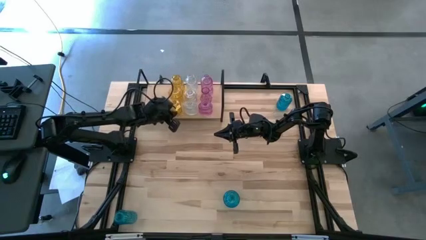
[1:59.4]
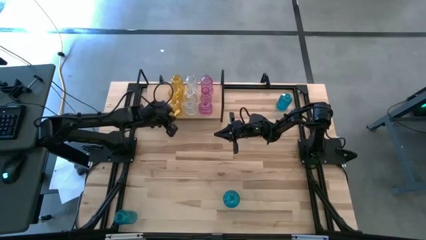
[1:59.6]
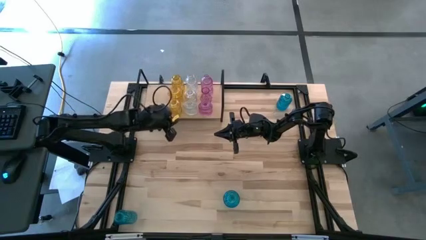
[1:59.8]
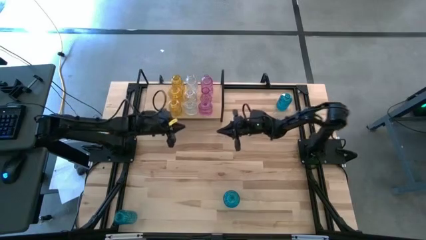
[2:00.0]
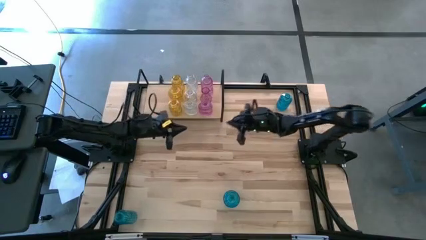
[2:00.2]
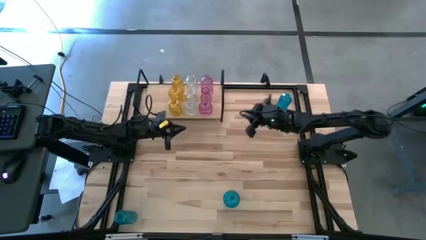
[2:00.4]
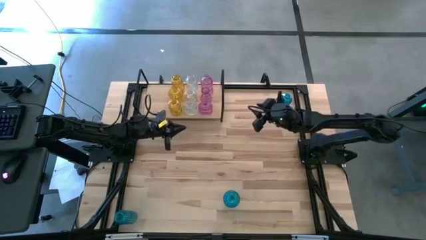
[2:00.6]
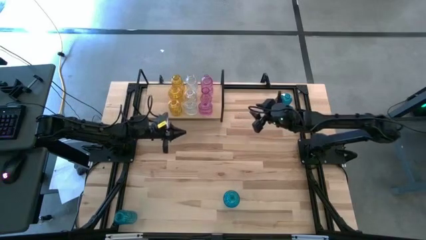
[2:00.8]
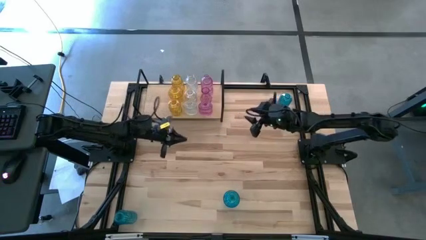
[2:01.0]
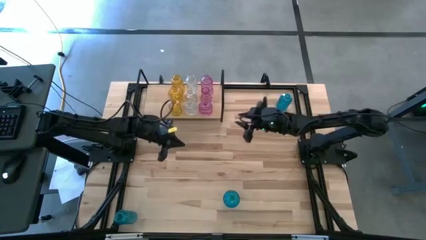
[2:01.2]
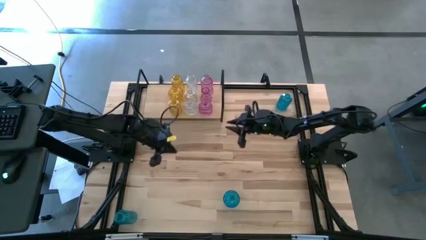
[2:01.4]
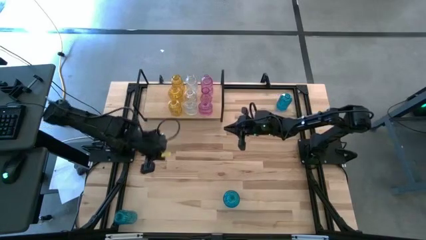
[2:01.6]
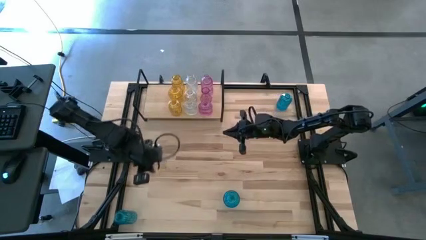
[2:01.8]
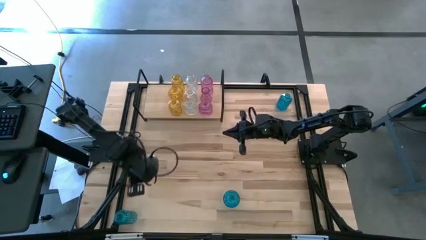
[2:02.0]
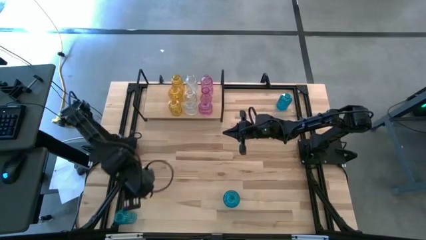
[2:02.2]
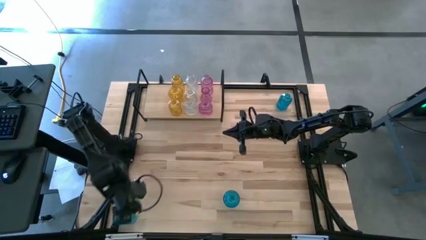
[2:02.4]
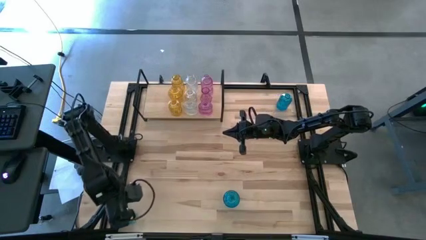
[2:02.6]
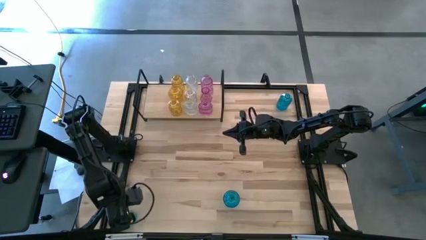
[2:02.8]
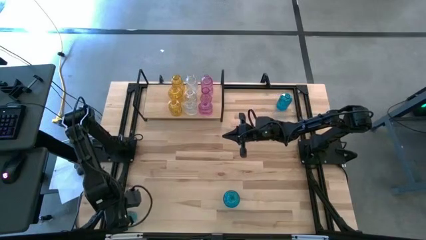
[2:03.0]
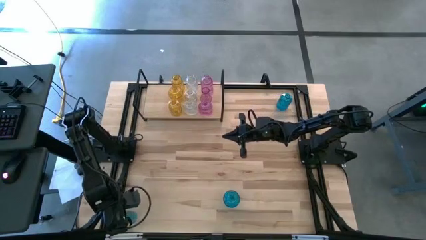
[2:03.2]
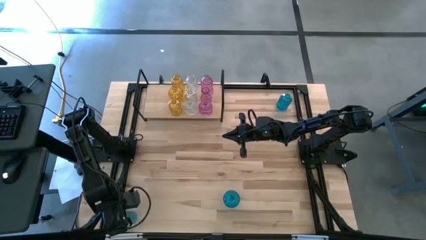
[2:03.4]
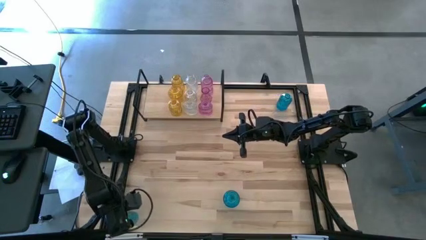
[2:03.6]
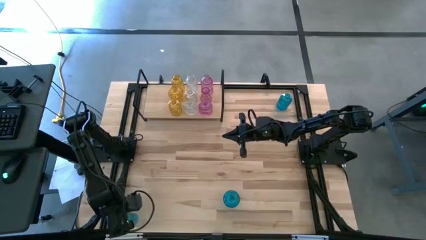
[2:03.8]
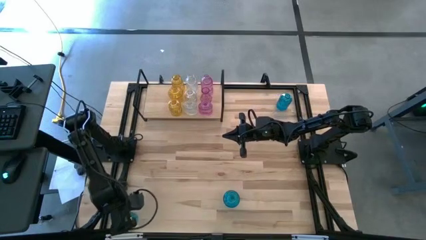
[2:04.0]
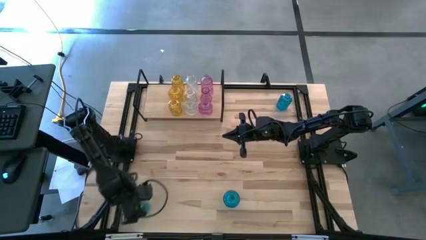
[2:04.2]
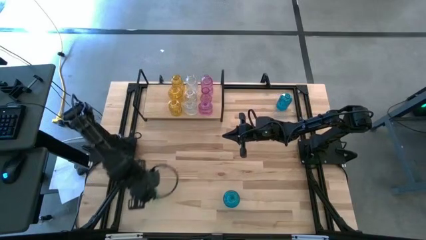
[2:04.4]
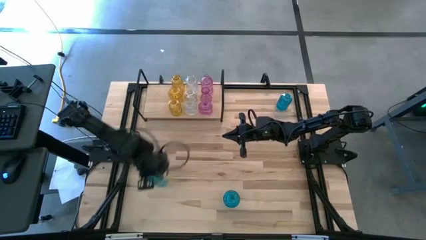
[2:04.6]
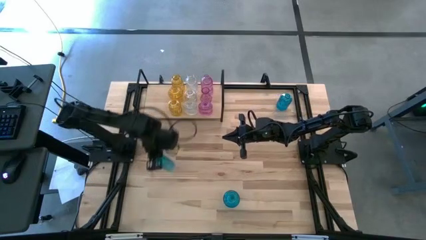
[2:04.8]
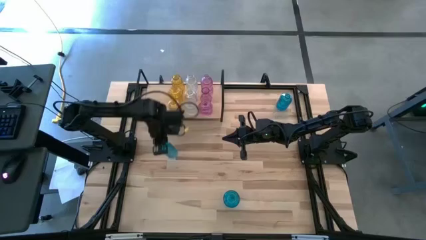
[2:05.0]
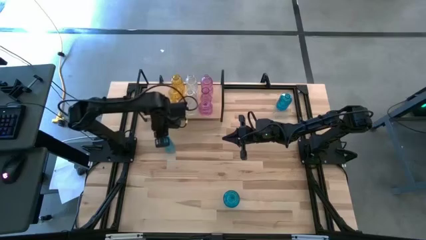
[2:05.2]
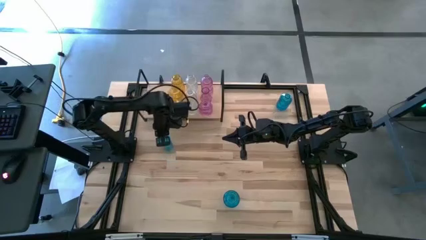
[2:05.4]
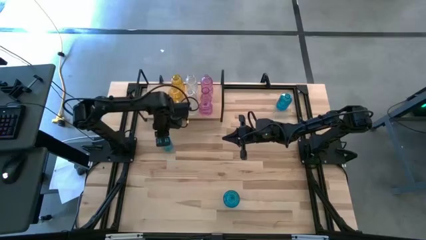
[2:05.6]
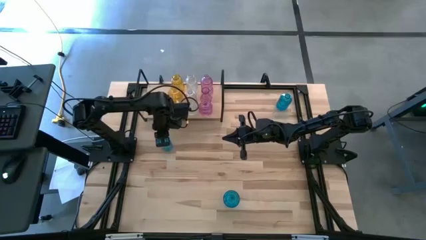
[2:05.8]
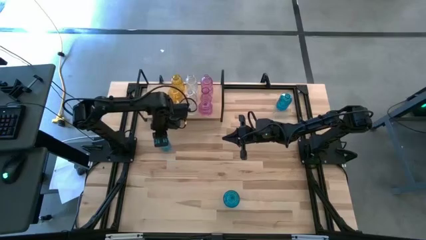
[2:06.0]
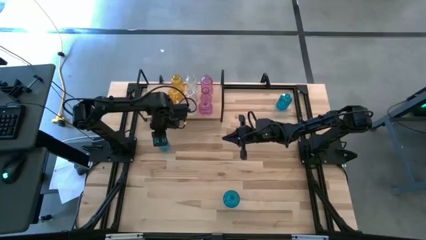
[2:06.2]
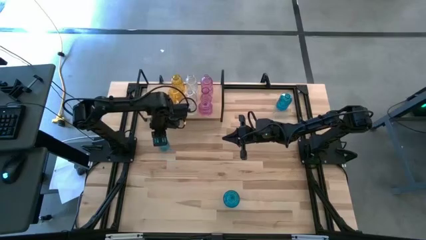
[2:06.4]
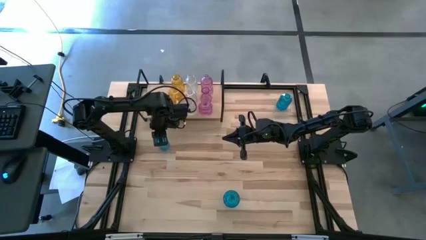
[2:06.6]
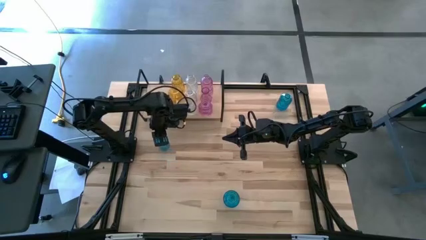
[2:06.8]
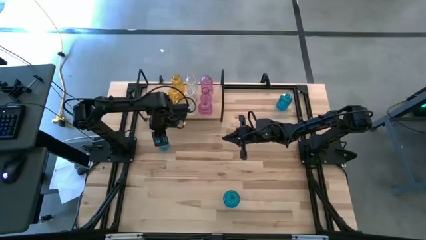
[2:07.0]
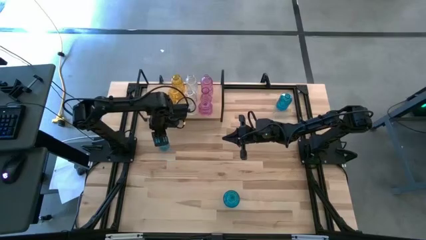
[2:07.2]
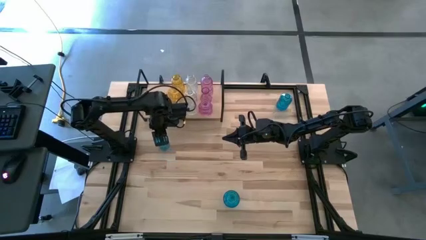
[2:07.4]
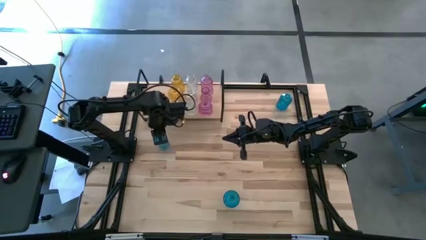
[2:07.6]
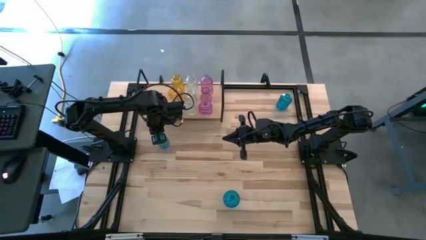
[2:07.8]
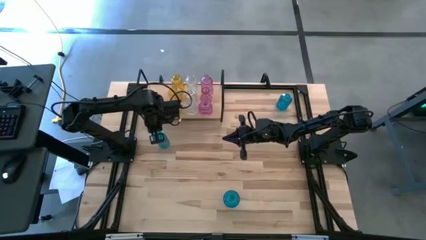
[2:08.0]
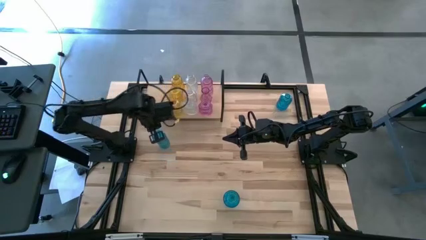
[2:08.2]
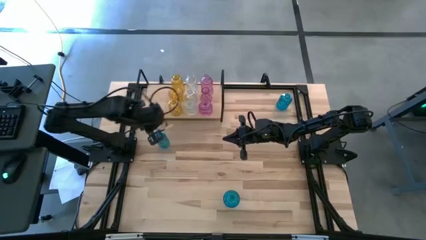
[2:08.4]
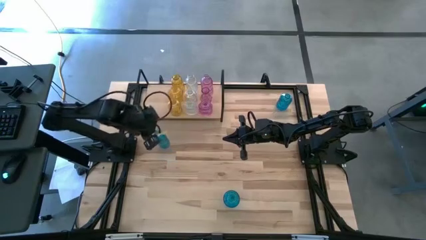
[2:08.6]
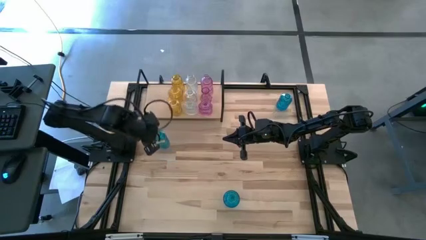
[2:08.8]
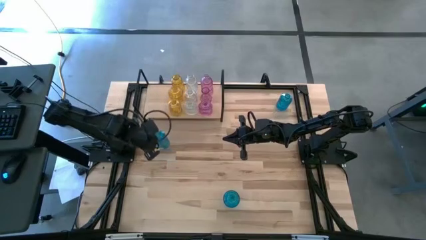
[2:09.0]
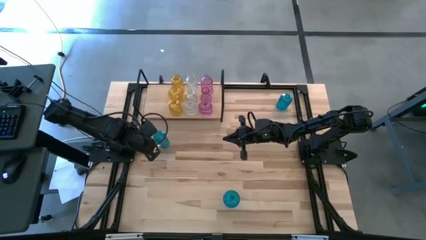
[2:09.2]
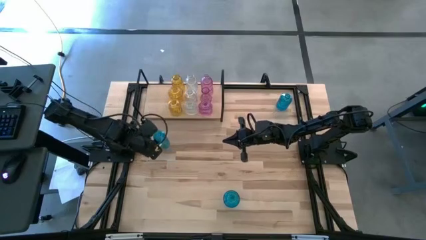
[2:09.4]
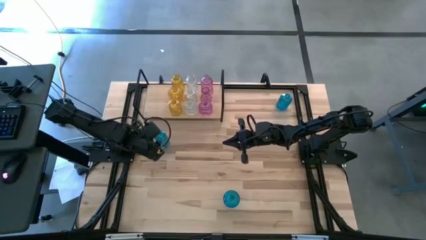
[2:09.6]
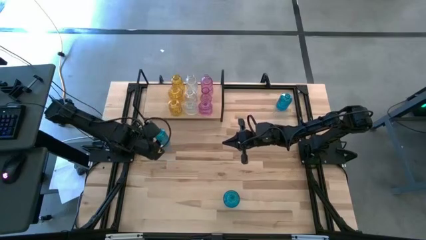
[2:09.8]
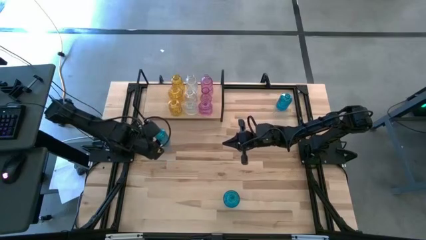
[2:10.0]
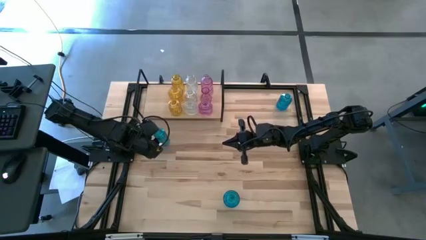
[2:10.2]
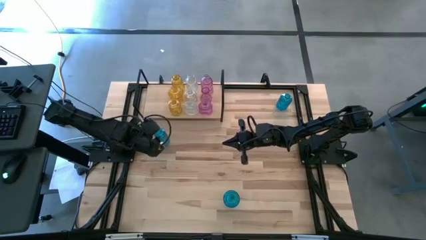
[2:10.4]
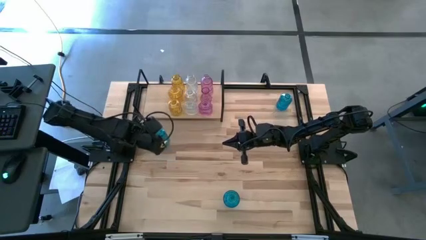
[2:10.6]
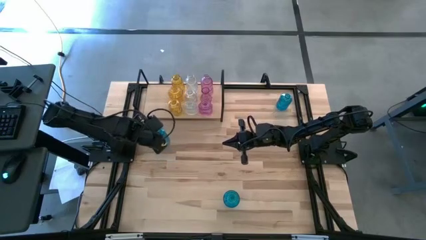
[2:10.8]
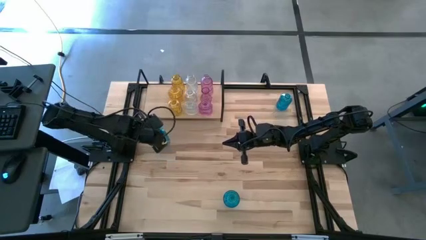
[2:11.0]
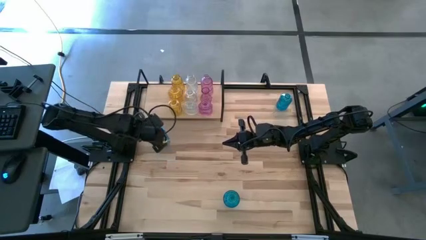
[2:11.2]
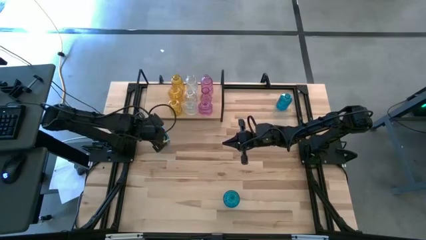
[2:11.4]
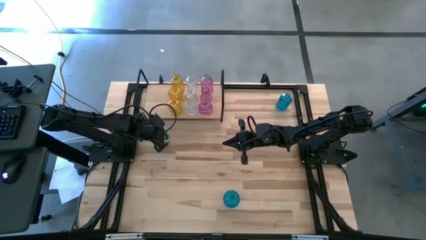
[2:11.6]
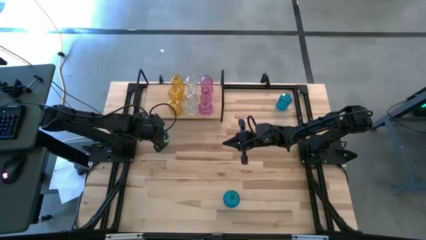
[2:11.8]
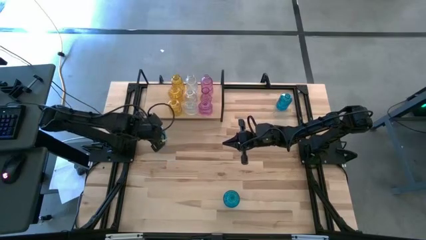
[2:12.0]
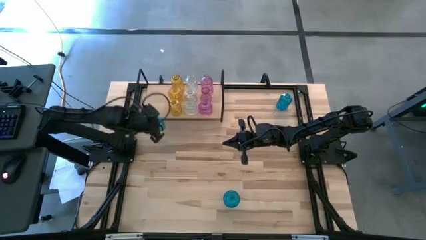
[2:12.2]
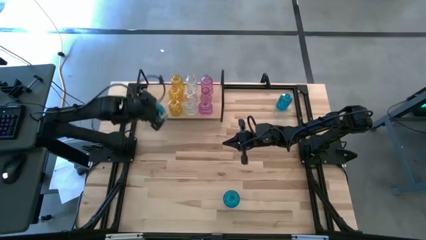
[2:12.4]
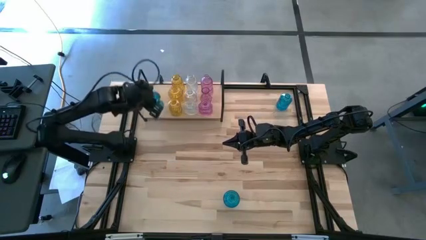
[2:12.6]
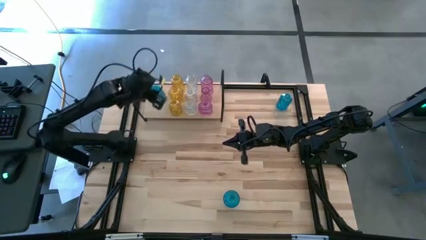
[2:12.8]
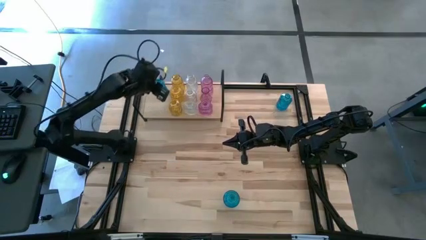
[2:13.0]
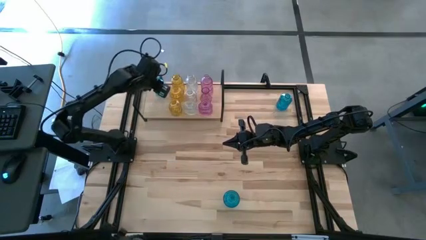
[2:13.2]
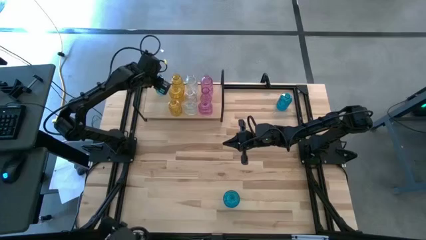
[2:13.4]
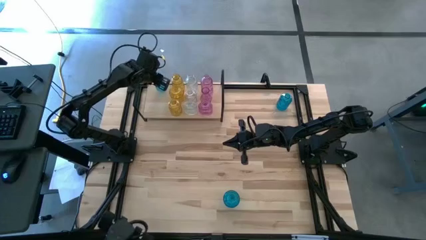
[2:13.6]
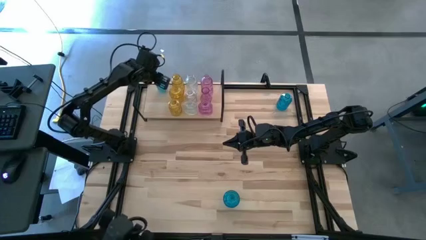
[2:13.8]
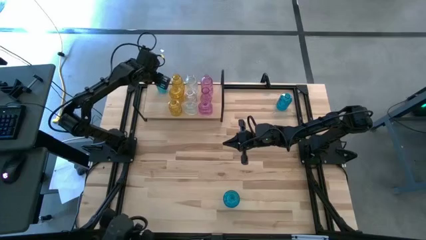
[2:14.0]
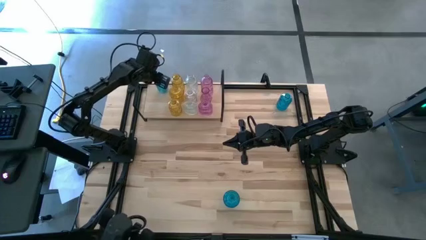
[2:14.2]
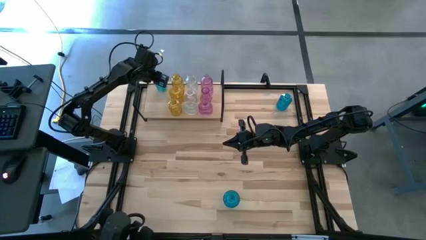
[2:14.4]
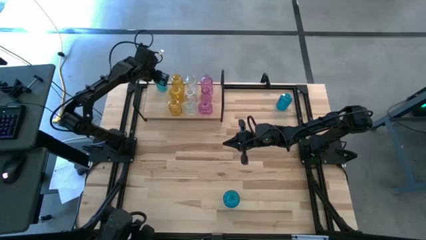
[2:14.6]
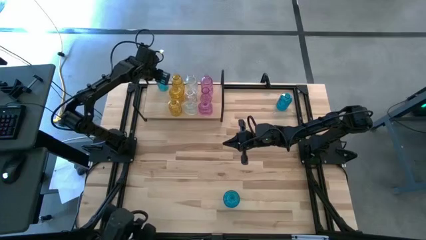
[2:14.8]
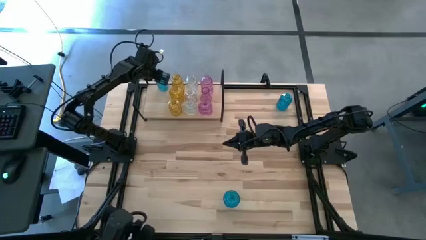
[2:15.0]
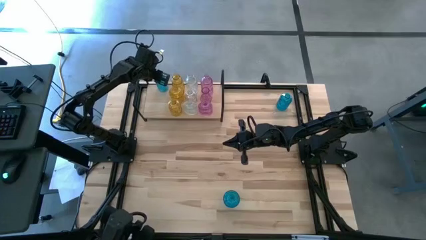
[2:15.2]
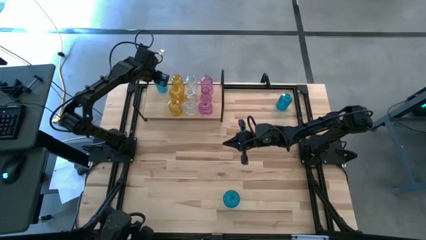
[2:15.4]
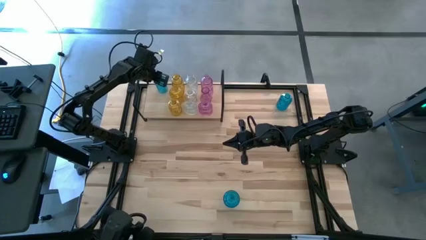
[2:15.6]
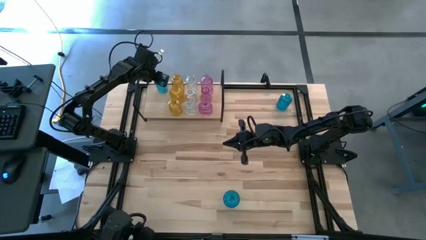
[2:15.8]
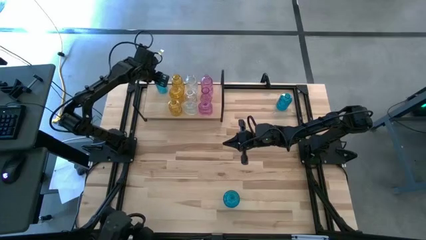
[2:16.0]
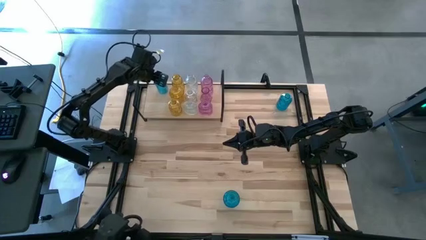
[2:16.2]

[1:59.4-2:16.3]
Task: sort vases onto shelf
Put the left blue vase on the shelf
